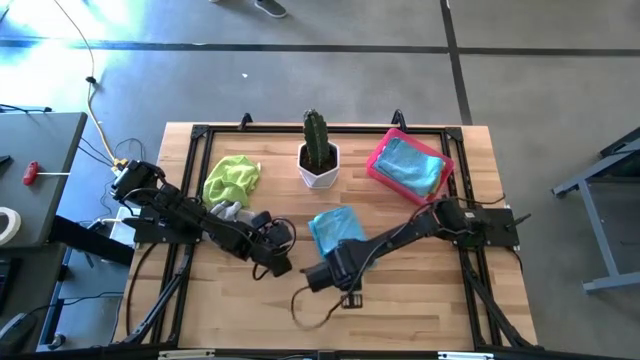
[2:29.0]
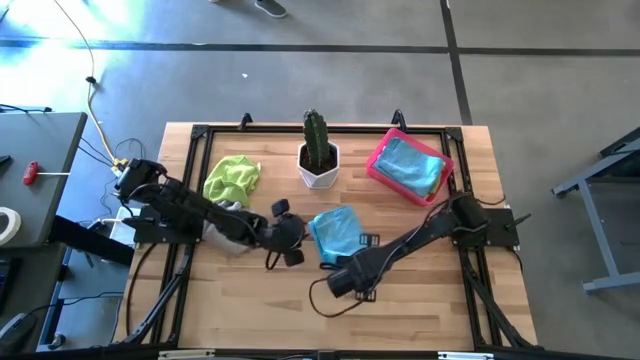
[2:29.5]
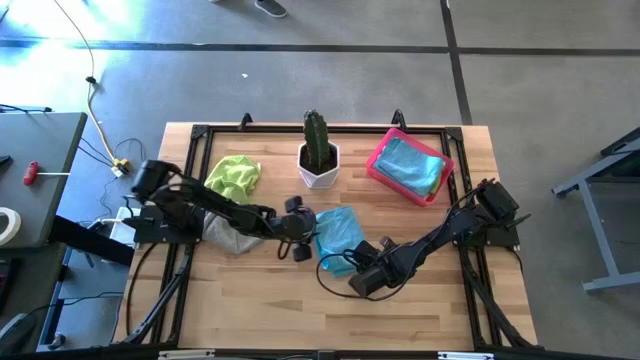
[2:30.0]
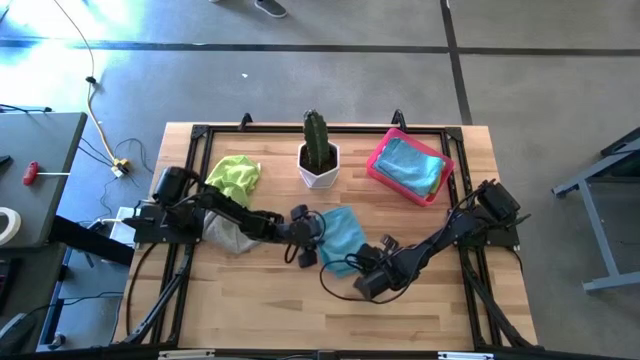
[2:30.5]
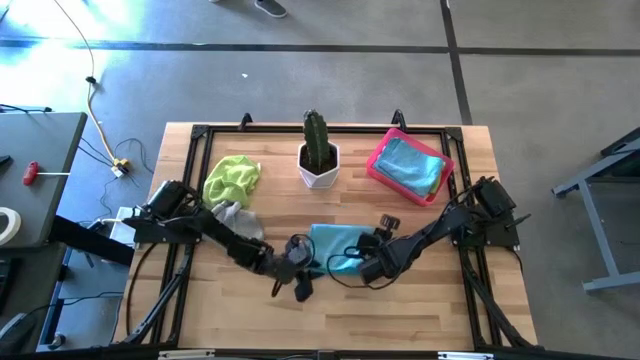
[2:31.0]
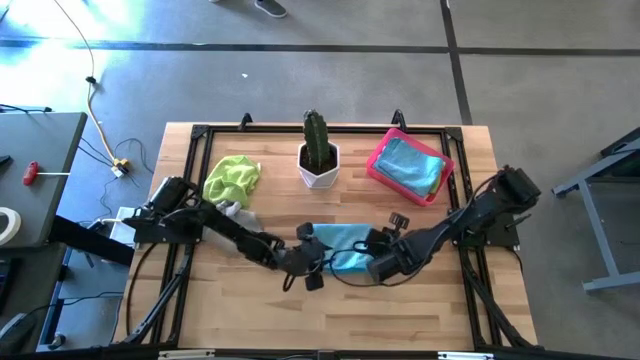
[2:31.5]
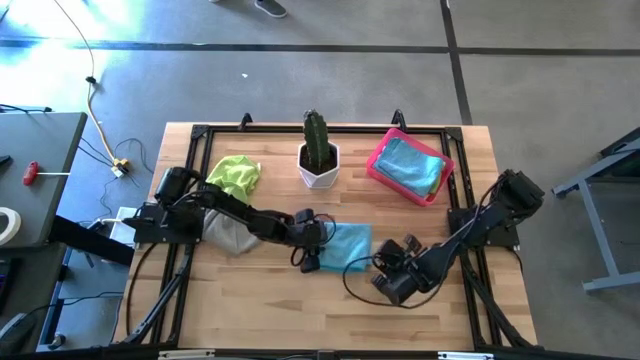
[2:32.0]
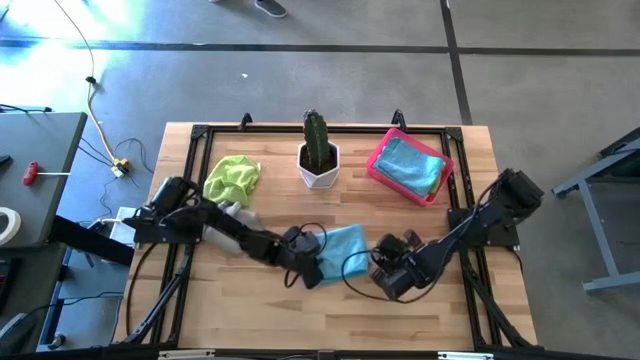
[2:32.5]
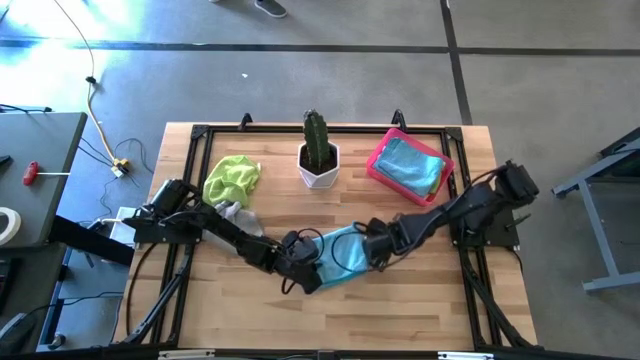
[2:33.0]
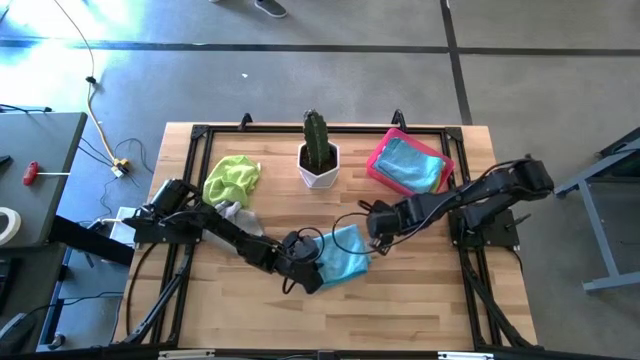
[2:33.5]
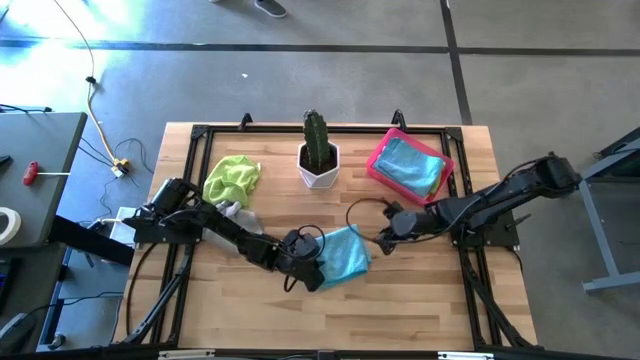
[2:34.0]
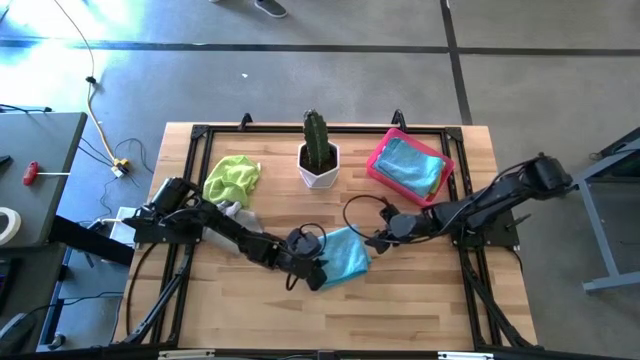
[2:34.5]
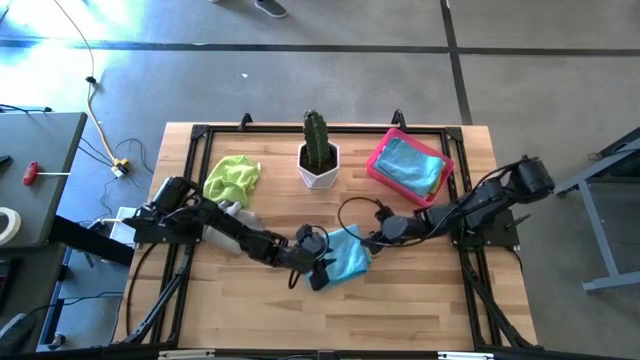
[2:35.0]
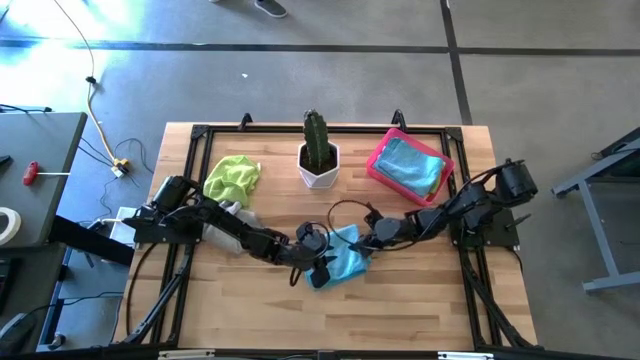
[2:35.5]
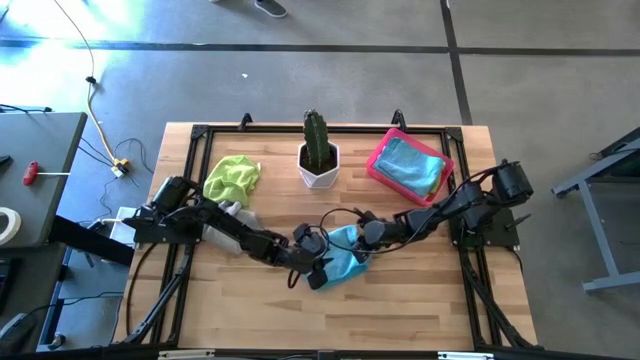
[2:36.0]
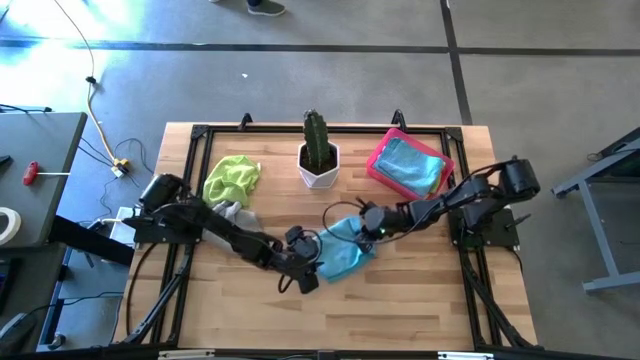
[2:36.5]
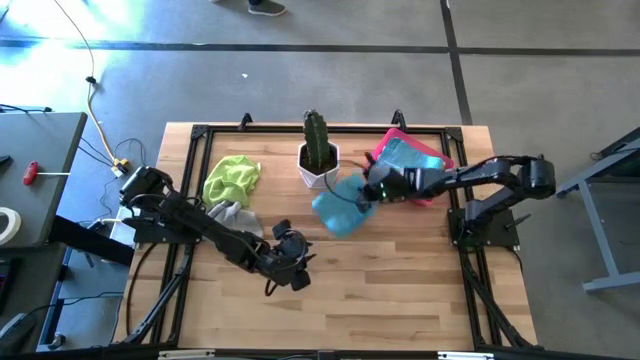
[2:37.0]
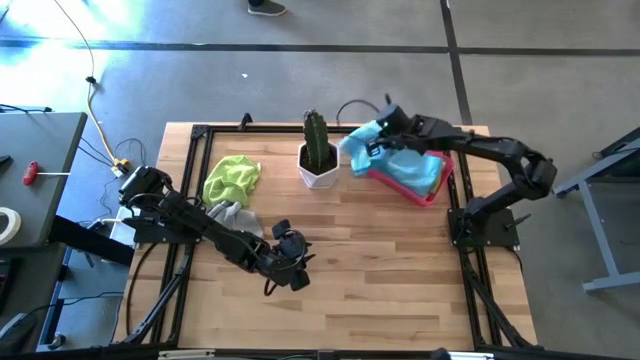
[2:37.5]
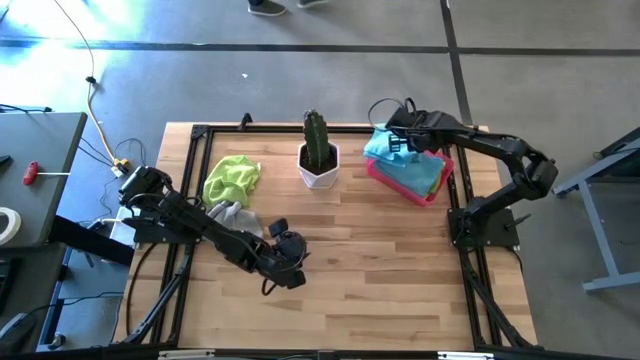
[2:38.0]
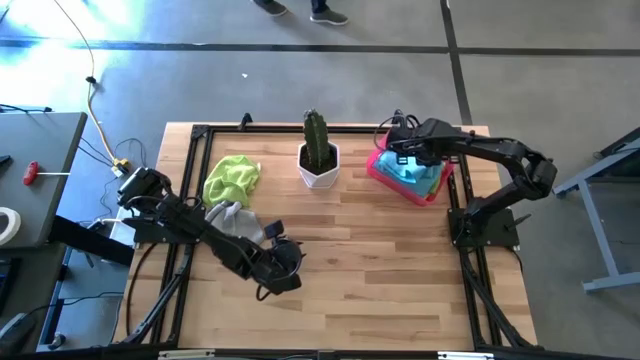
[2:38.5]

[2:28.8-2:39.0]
Task: Fold microfiber towels
Put the blue microfiber towel into the red bin

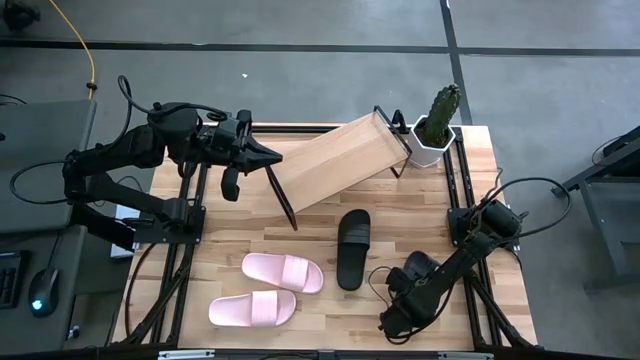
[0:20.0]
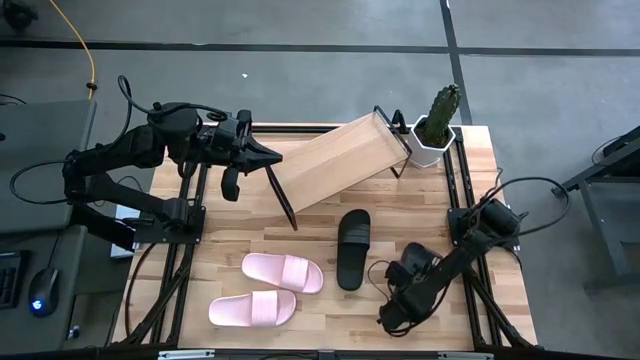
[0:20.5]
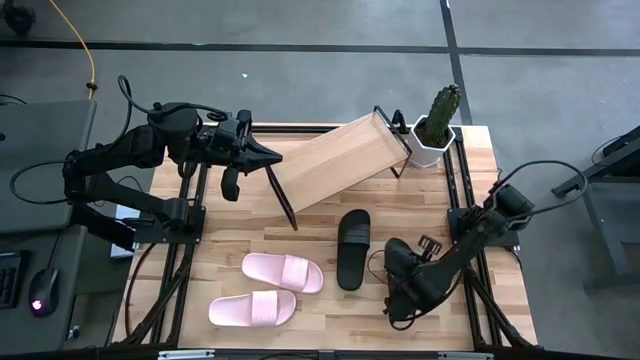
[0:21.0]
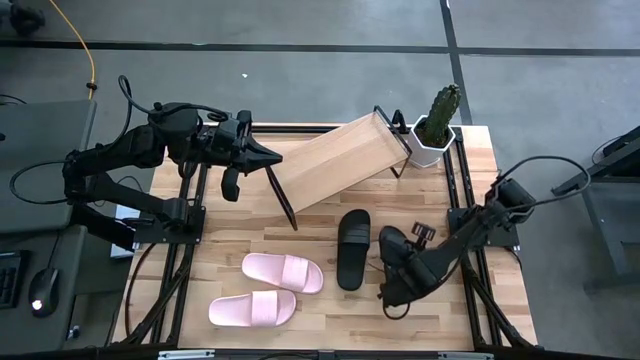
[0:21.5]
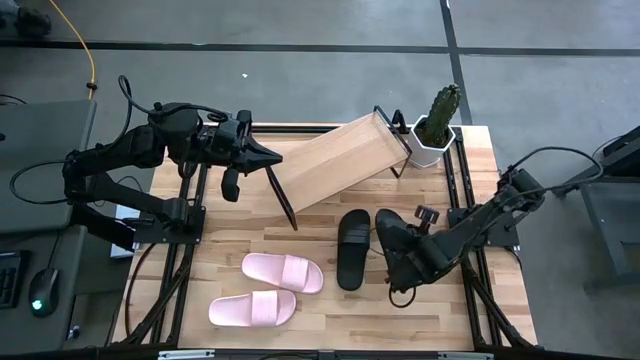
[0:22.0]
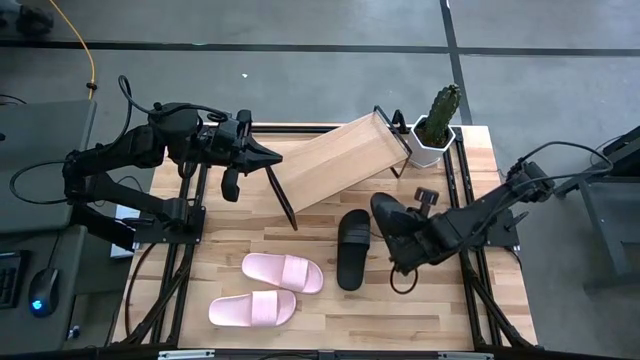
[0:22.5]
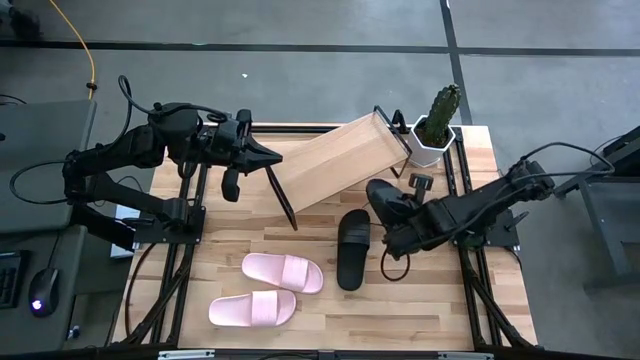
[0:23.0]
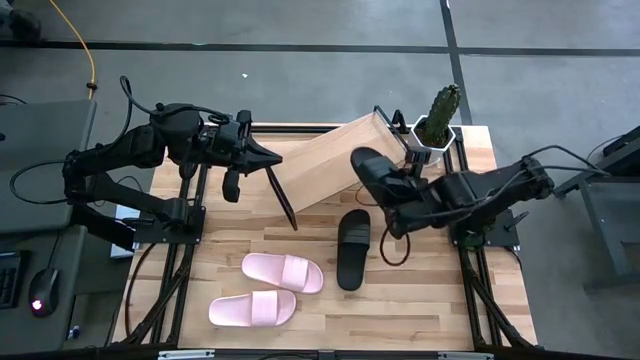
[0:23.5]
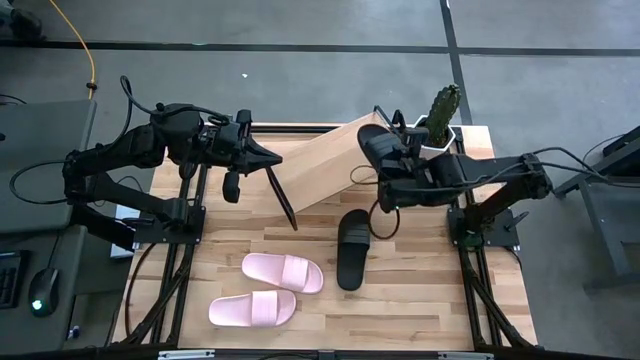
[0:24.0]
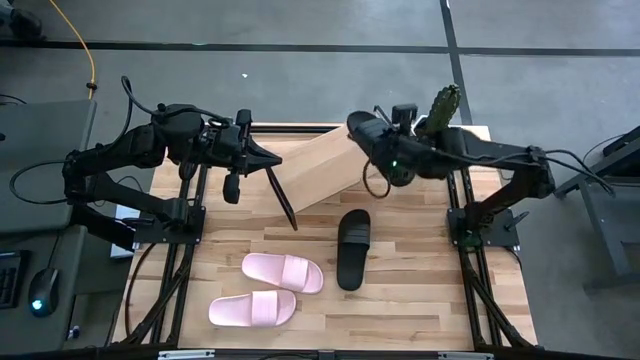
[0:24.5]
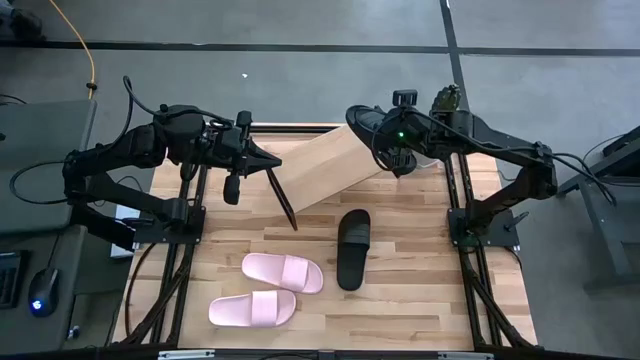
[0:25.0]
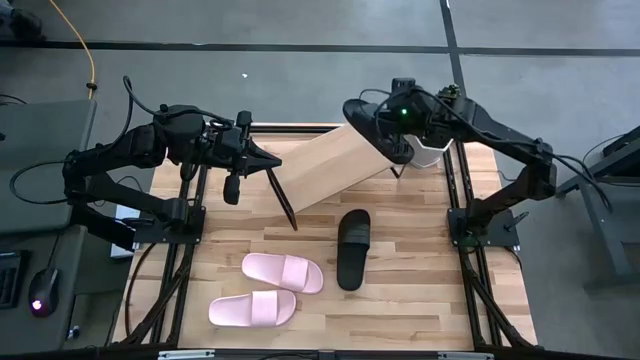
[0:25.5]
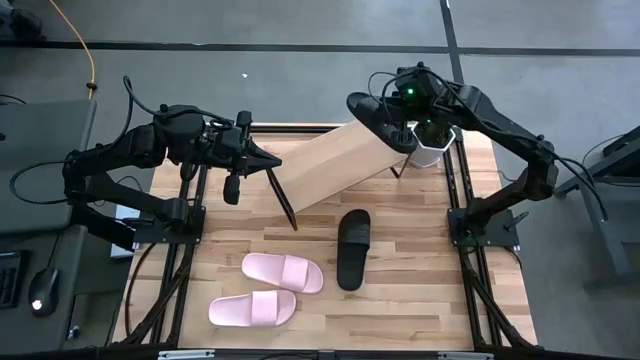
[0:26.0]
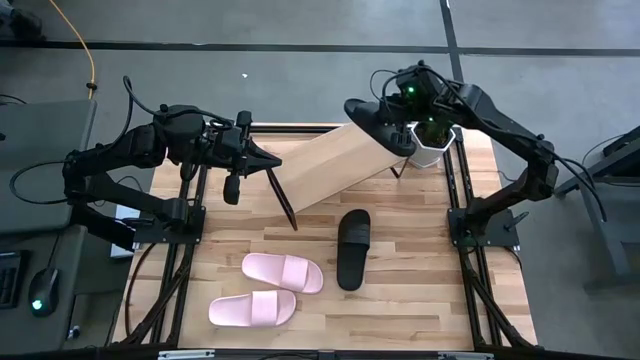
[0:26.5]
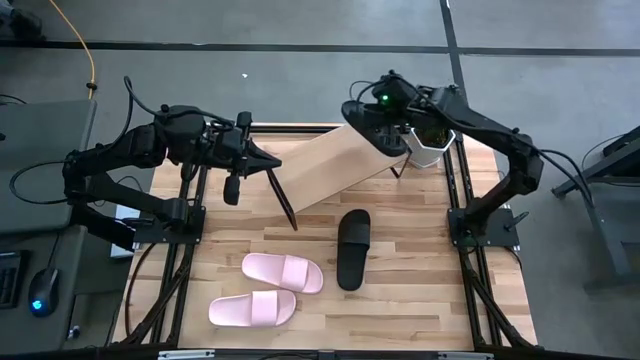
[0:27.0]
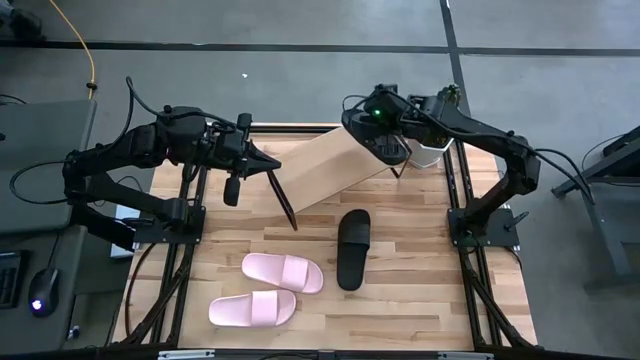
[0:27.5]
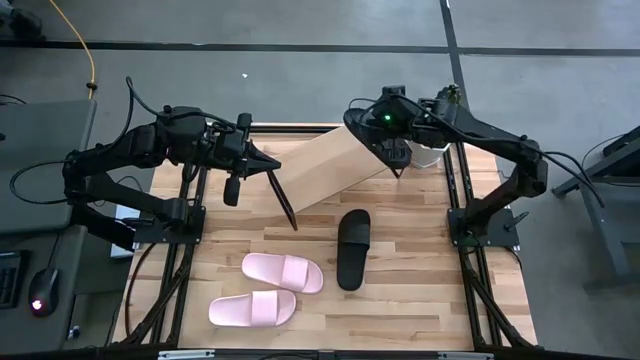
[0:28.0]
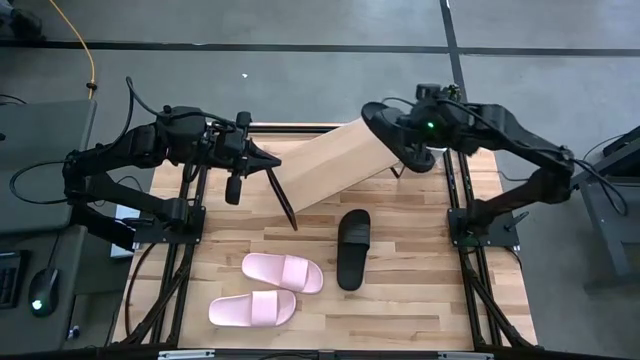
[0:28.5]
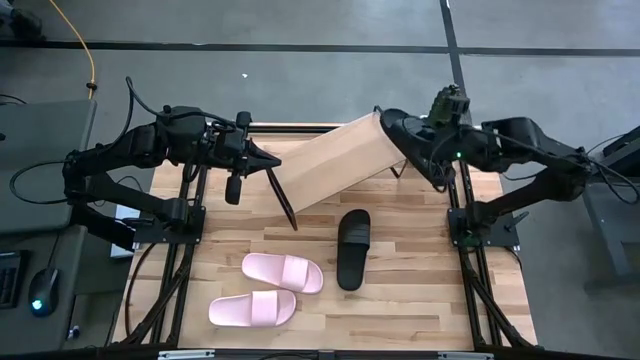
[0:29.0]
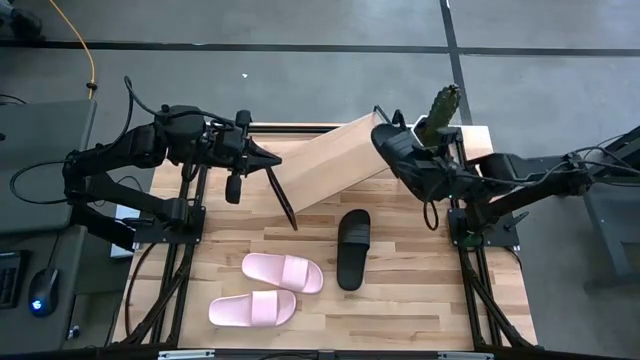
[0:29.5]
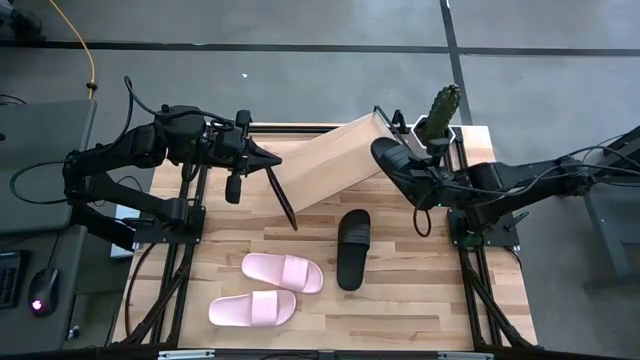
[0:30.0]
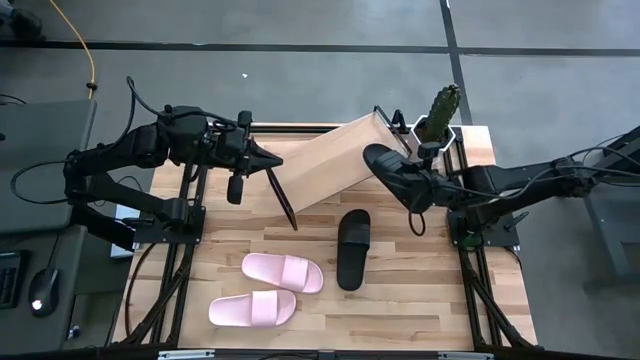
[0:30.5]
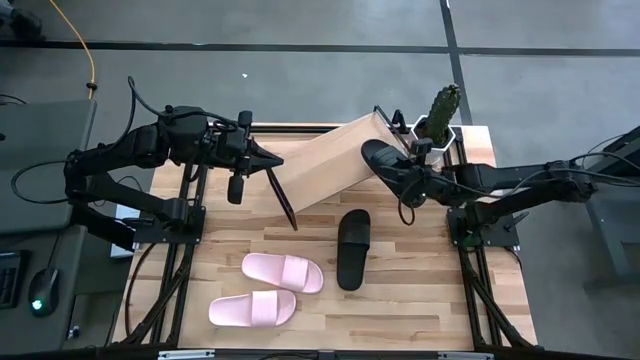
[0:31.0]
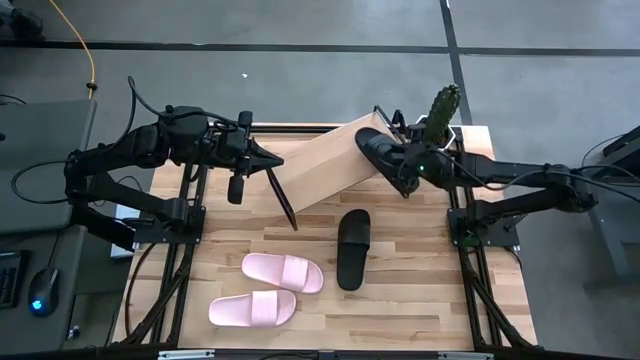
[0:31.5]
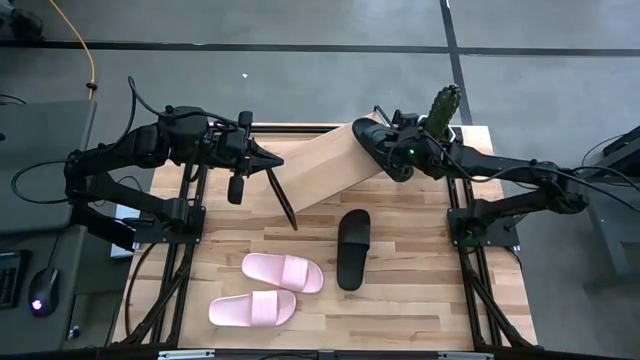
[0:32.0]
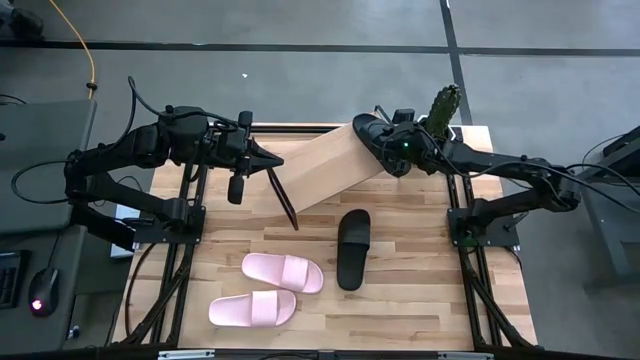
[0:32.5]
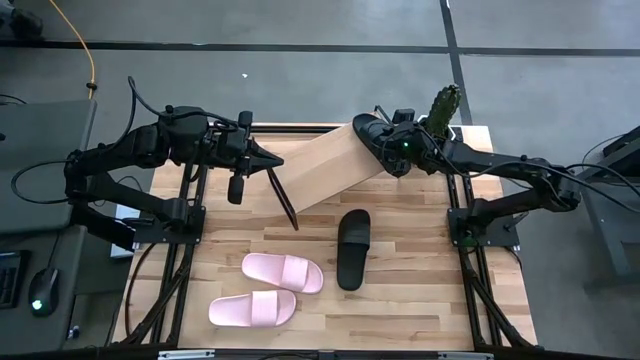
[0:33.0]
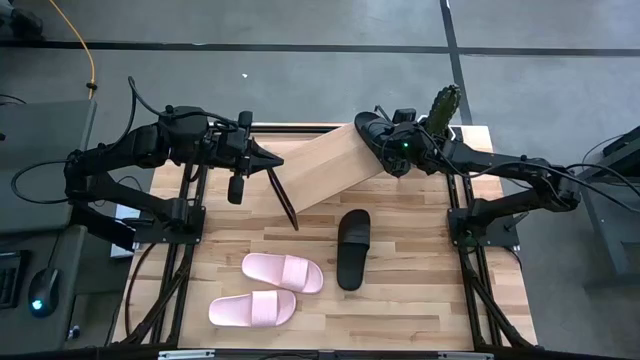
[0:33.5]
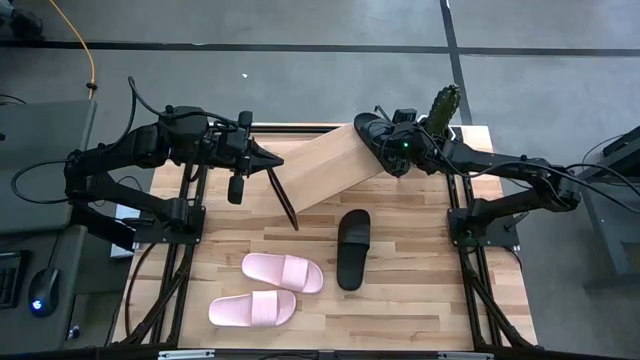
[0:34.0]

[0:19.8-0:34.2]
Task: Pick and place slides into the shelf
Put the right black slide on the shelf
